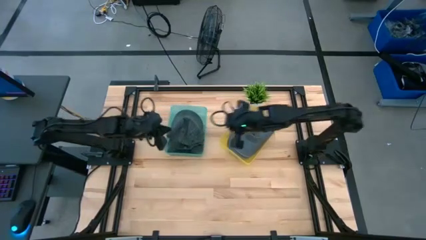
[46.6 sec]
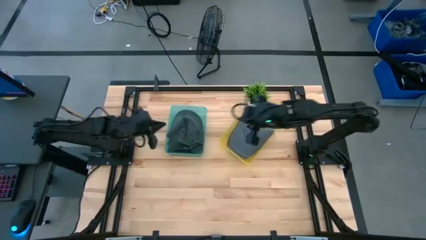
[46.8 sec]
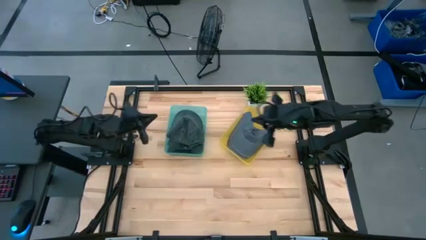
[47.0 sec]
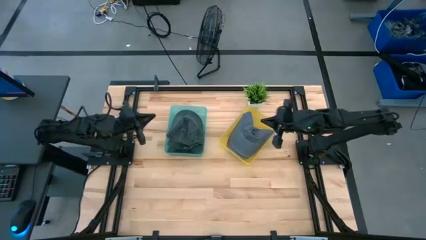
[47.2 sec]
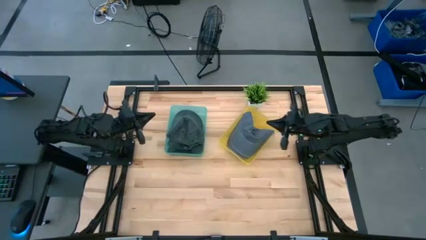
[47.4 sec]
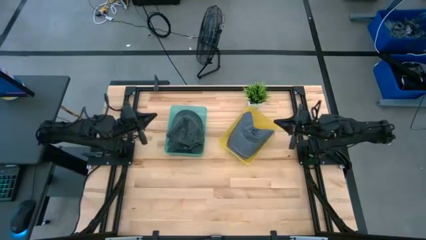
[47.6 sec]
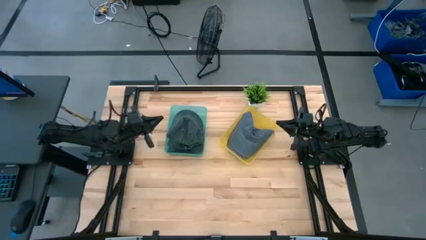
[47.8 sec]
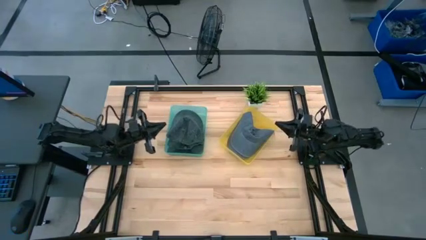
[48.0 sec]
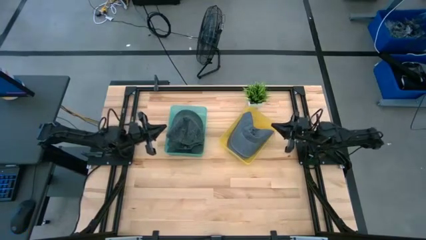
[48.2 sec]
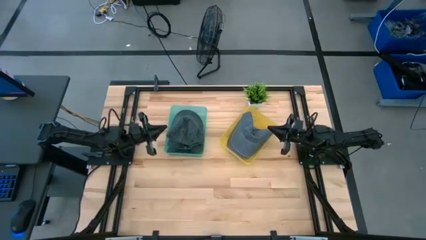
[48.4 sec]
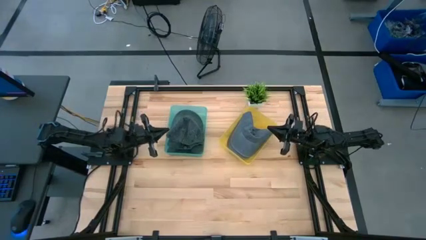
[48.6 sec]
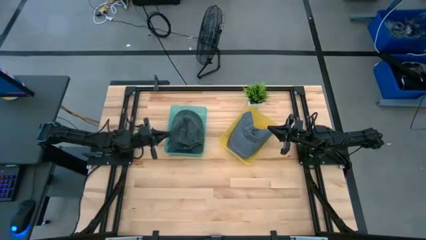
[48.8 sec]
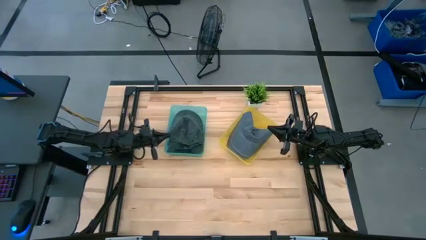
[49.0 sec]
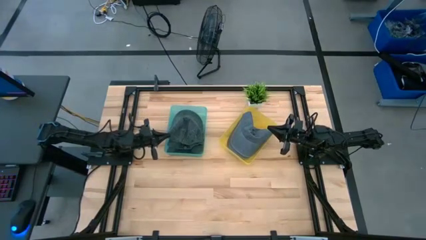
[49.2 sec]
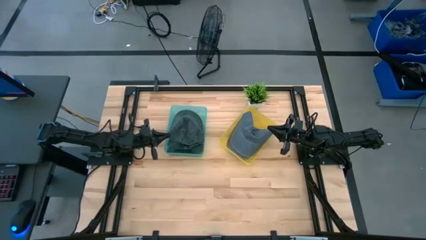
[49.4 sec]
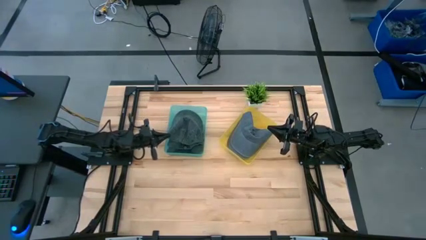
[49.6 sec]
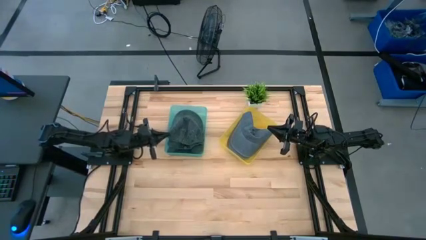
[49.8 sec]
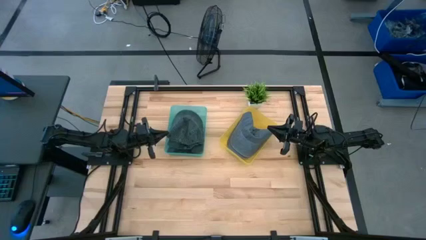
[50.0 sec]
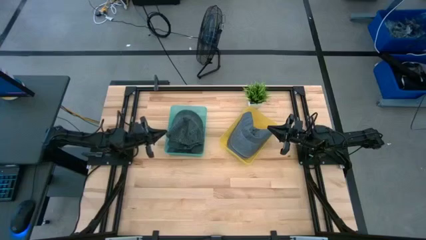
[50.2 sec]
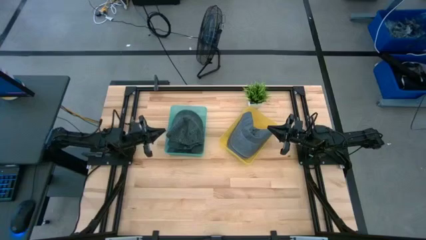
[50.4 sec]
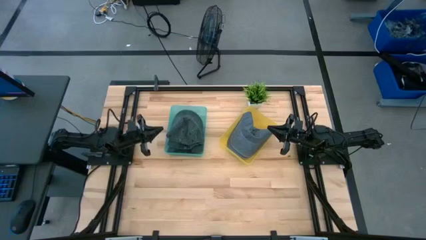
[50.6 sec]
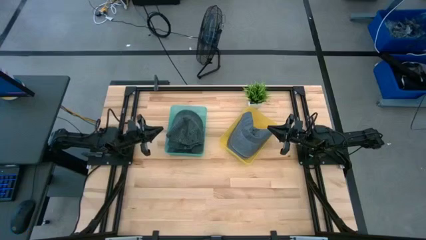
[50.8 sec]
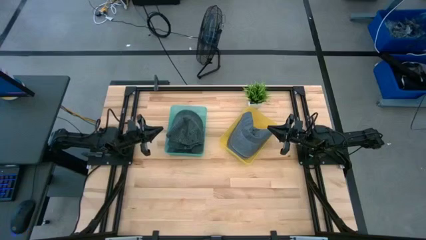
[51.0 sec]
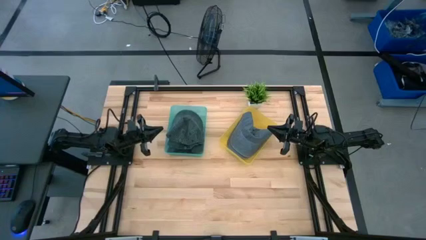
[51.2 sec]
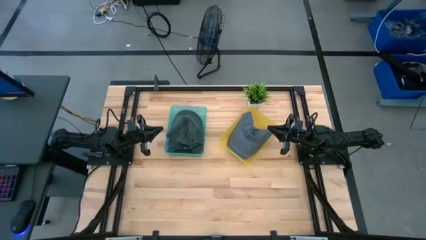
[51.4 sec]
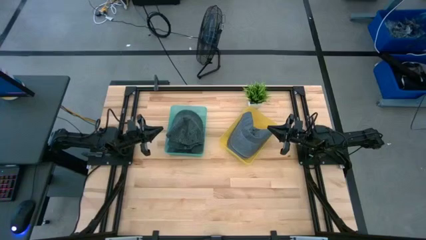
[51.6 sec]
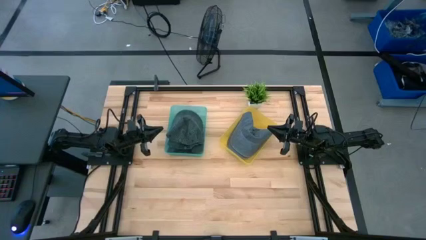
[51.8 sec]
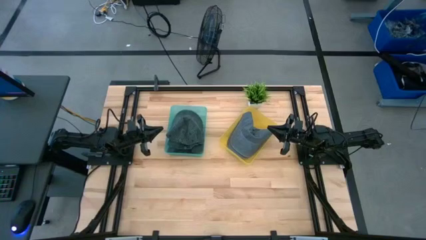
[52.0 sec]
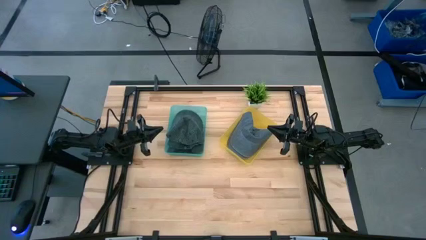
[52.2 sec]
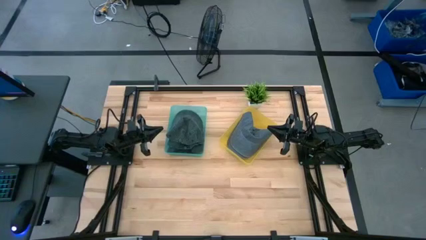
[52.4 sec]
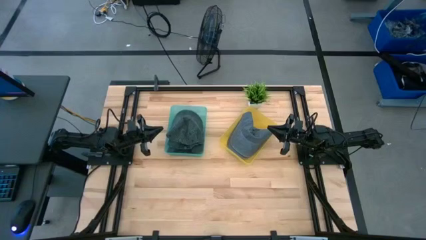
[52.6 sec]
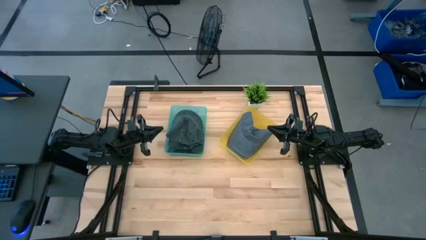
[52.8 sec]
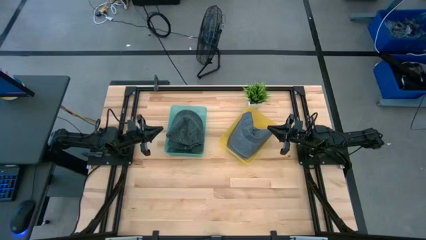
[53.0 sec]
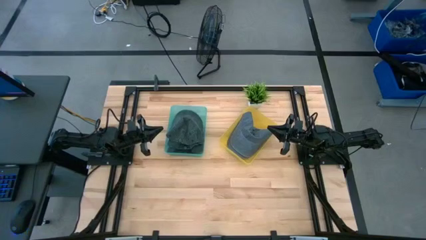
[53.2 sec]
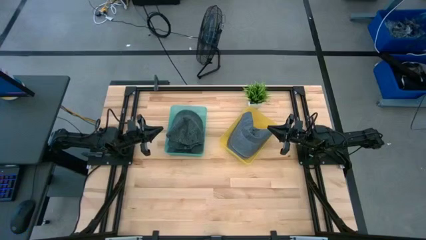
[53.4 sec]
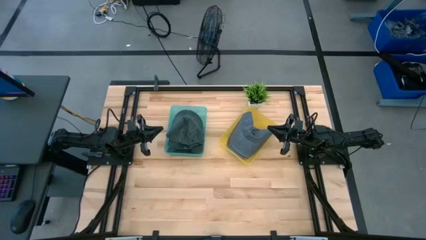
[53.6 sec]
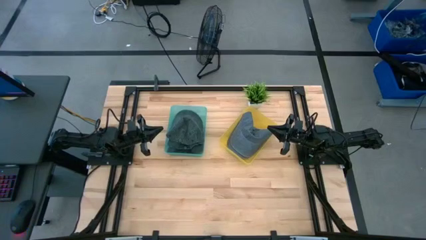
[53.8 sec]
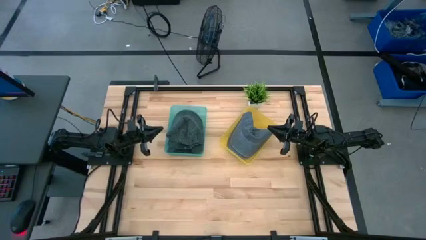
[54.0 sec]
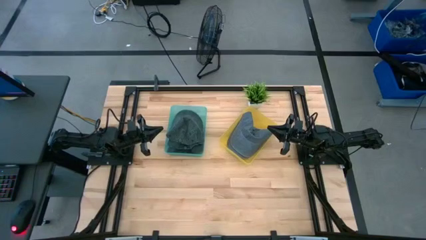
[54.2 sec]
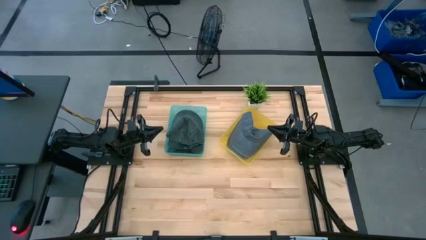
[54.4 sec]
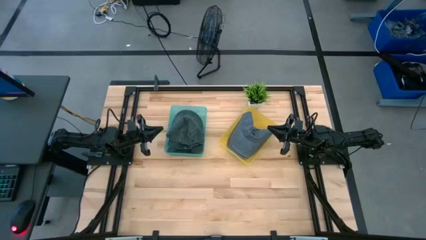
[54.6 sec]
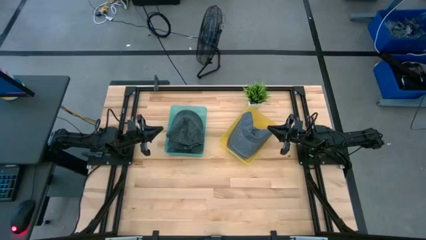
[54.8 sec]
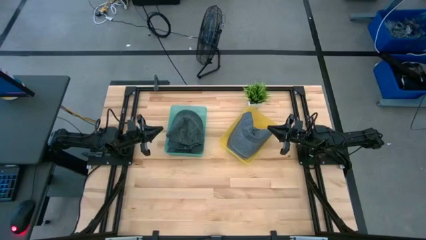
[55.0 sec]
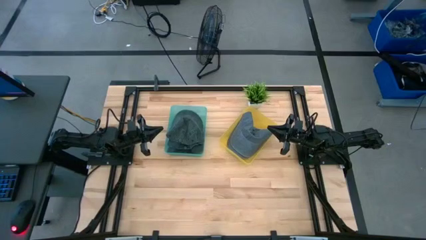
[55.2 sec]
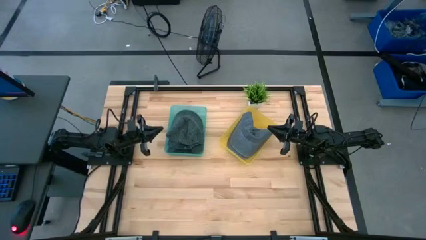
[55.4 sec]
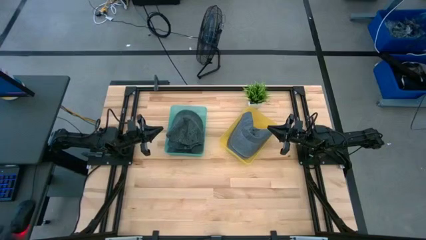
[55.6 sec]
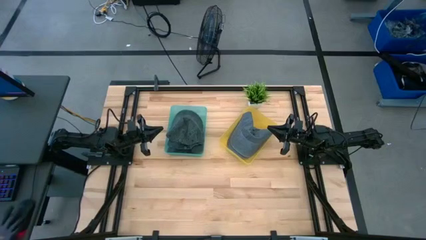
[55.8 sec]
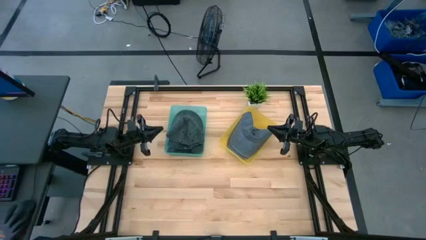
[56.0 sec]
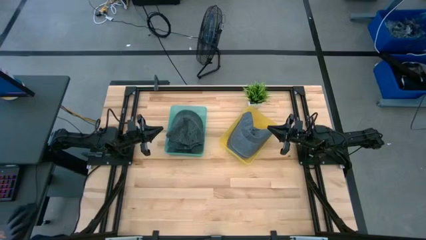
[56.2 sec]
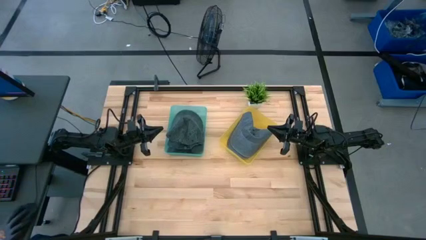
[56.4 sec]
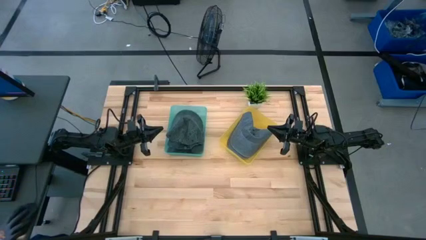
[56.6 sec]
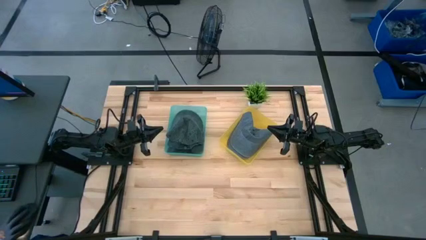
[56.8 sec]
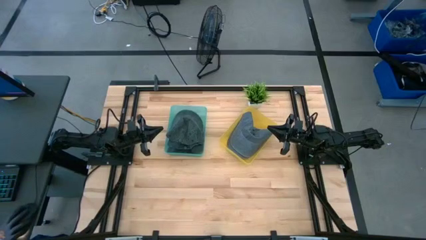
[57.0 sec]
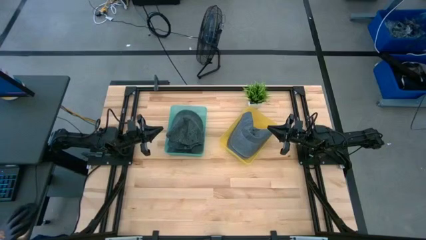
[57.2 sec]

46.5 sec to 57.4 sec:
Task: Pick & Place hat
Return to Home Position

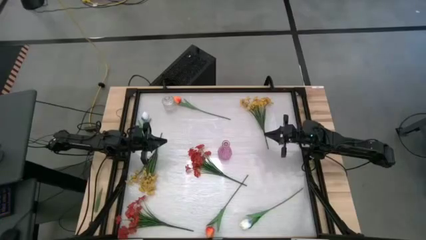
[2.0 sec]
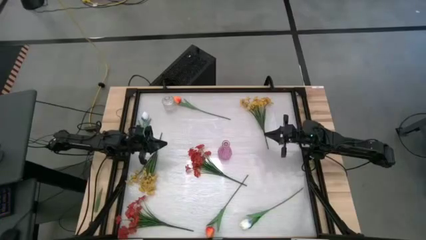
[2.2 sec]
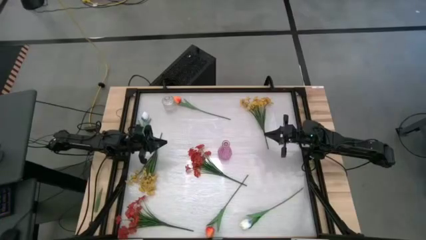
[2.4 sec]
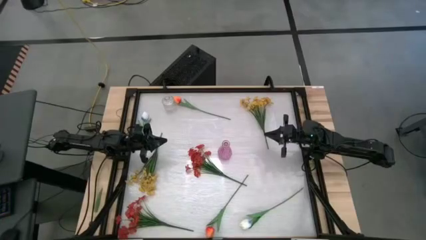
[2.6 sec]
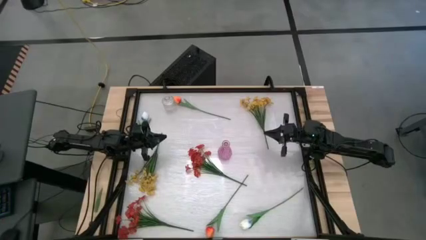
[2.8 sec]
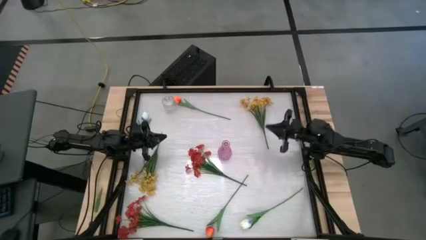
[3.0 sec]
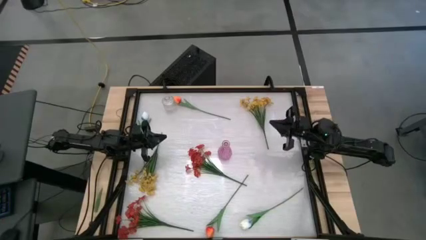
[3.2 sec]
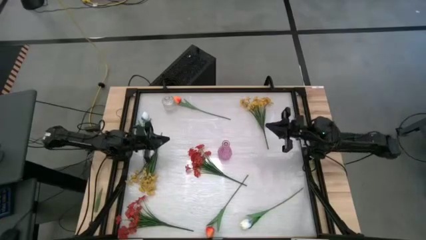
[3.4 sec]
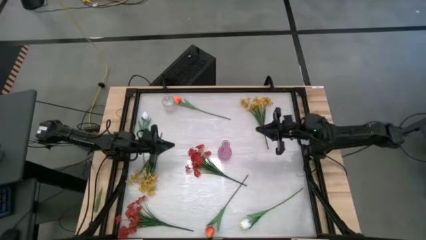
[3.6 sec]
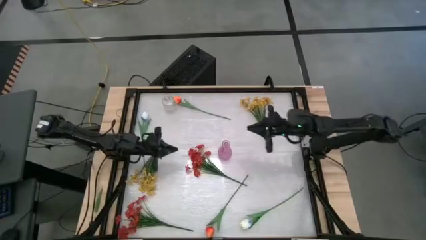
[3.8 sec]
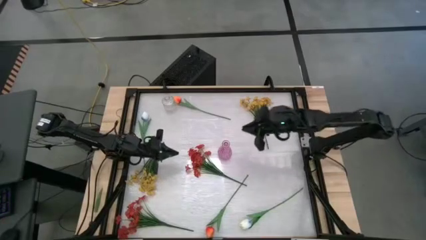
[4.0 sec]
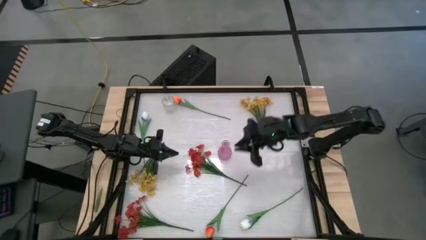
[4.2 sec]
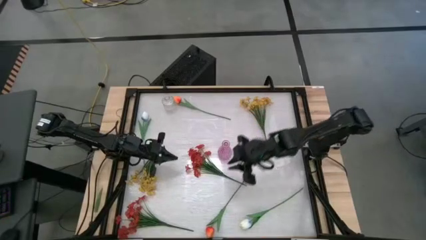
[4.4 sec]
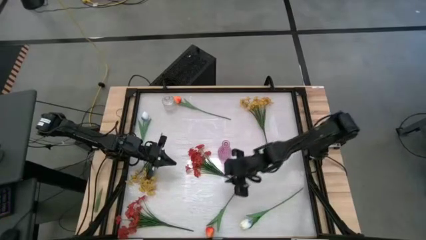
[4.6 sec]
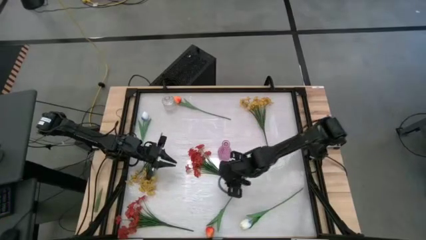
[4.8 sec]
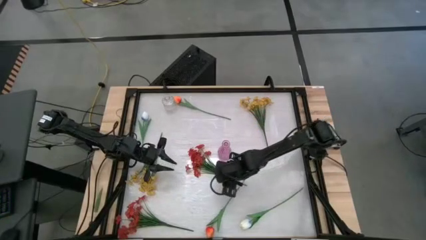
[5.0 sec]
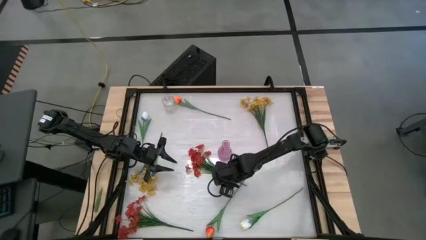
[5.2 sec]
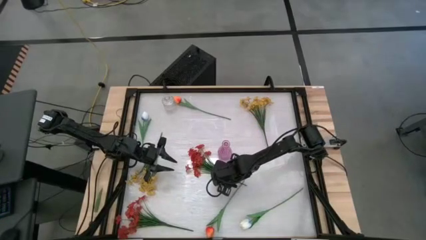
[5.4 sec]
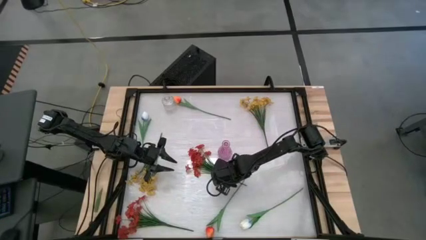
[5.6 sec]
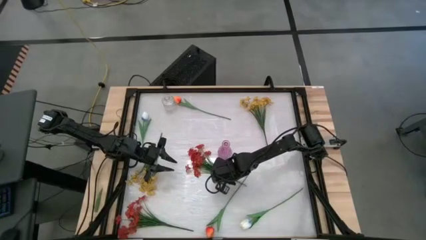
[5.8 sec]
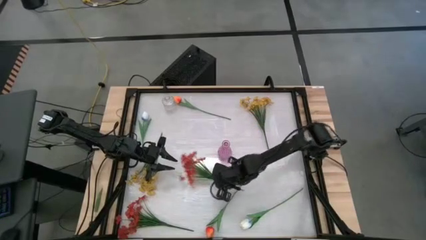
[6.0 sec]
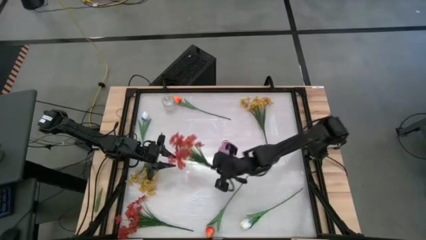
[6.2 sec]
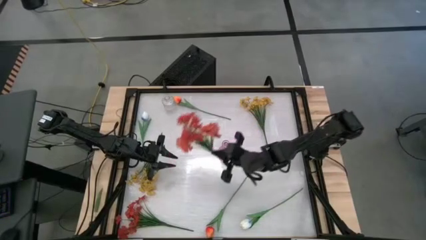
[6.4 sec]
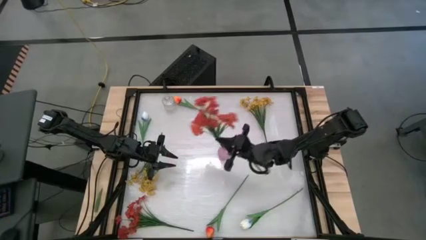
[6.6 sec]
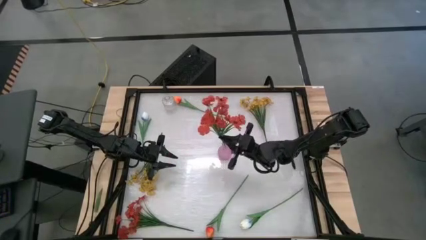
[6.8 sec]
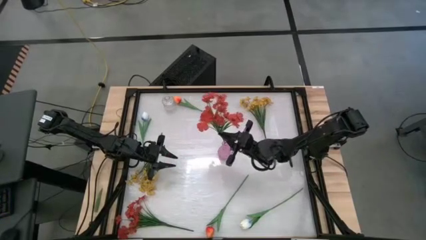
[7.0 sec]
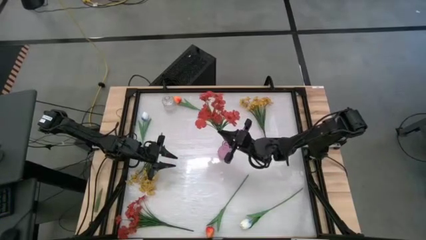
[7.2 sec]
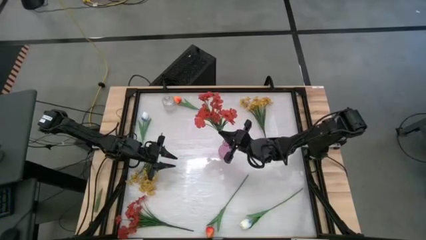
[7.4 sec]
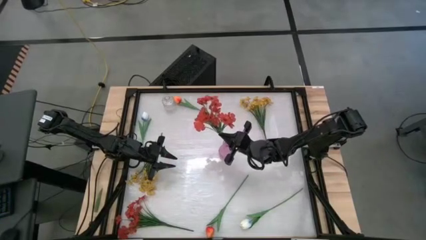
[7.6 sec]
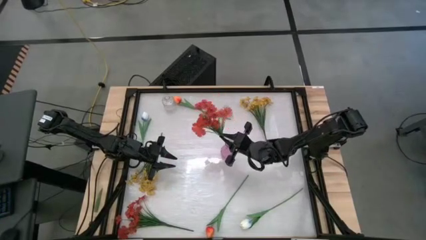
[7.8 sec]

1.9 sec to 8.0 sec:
Task: Sort flowers into vase by color
Put the top red flowers into the violet vase
